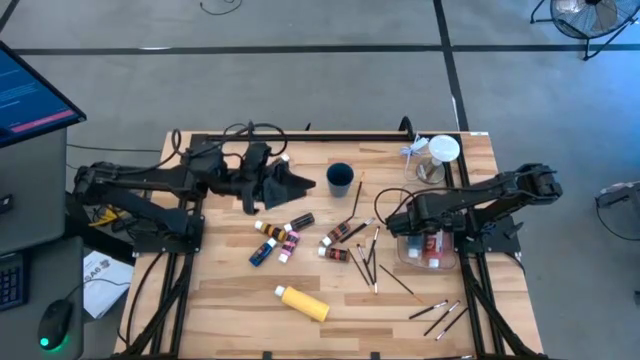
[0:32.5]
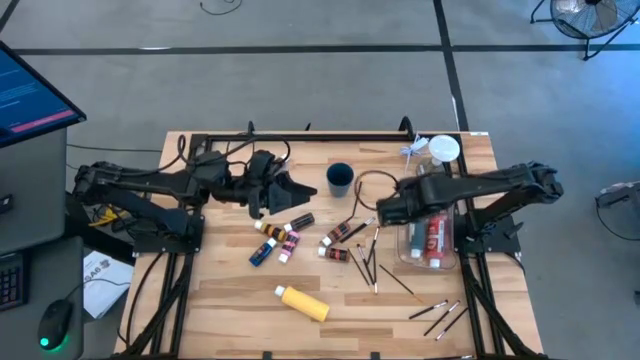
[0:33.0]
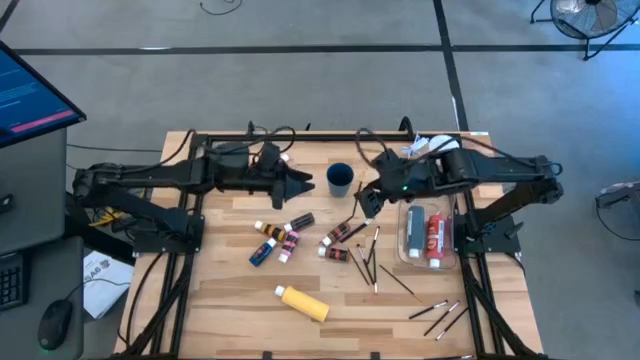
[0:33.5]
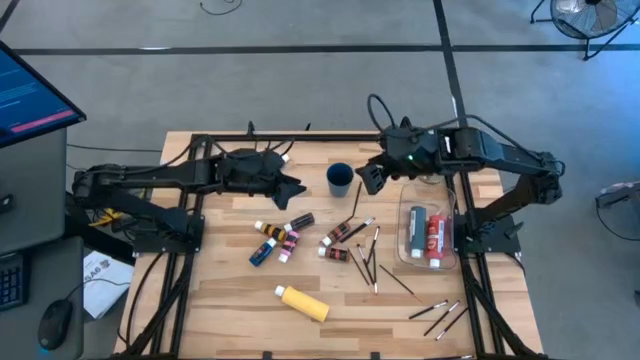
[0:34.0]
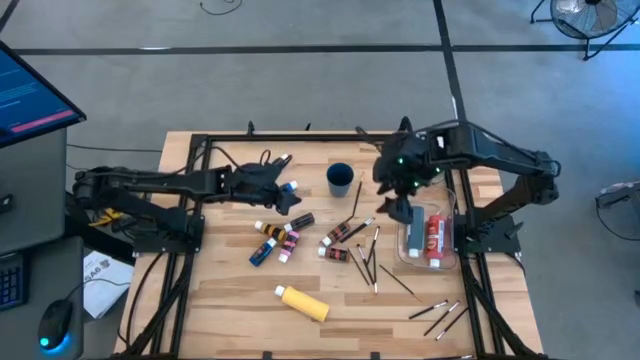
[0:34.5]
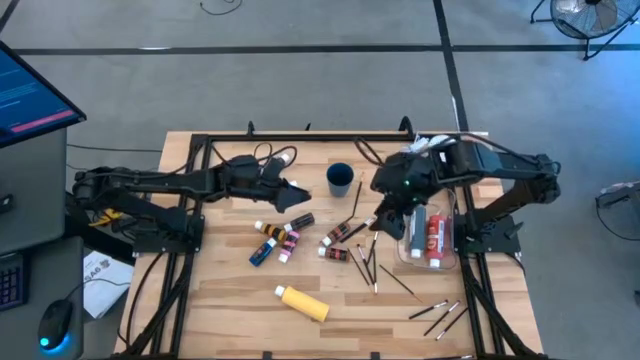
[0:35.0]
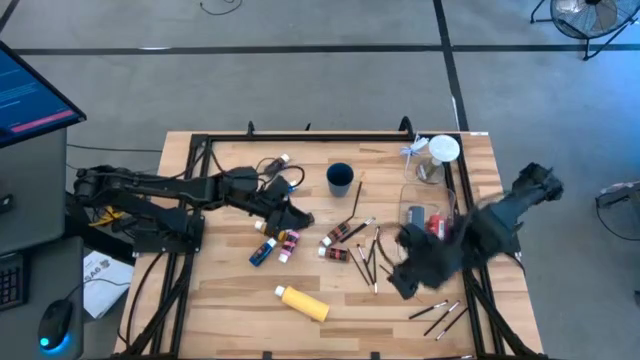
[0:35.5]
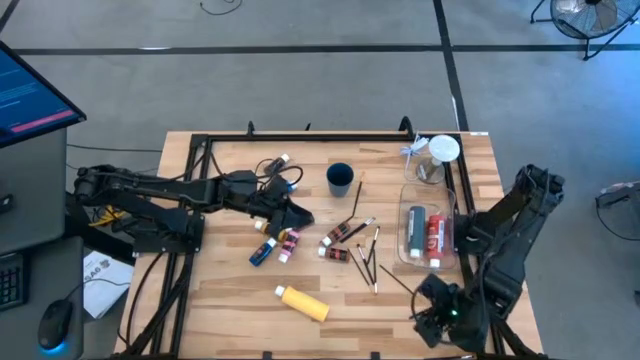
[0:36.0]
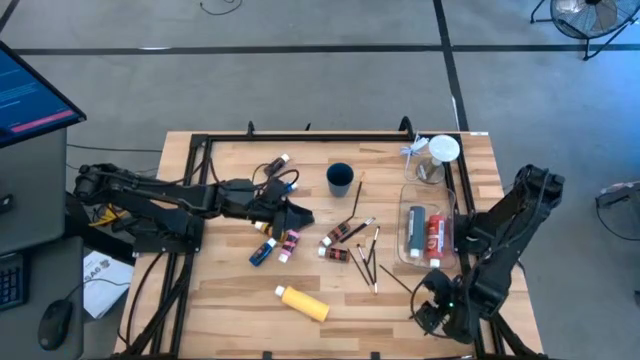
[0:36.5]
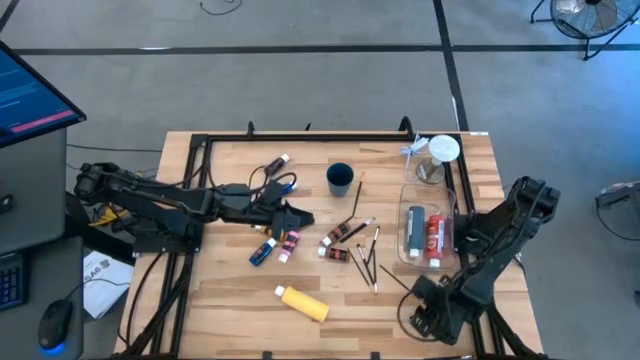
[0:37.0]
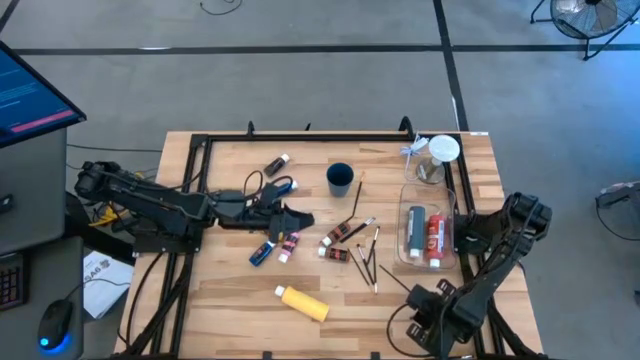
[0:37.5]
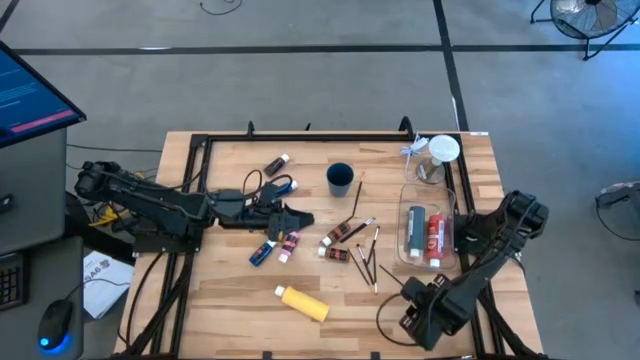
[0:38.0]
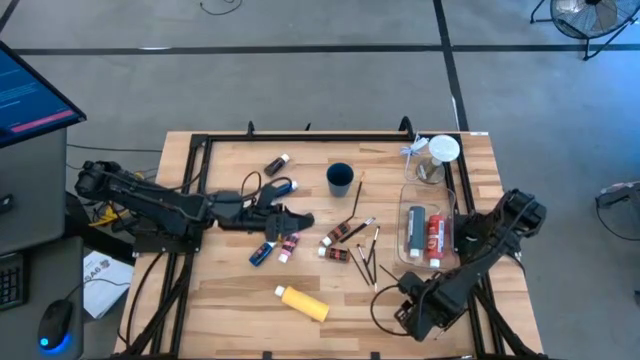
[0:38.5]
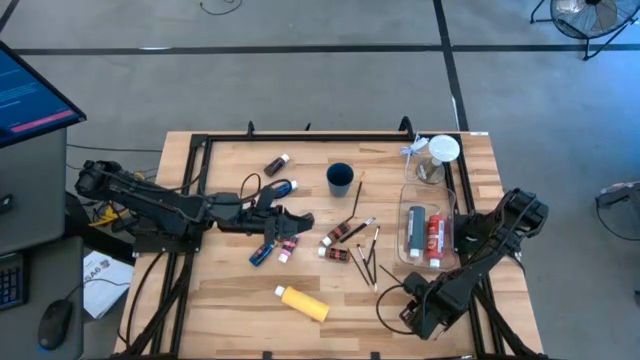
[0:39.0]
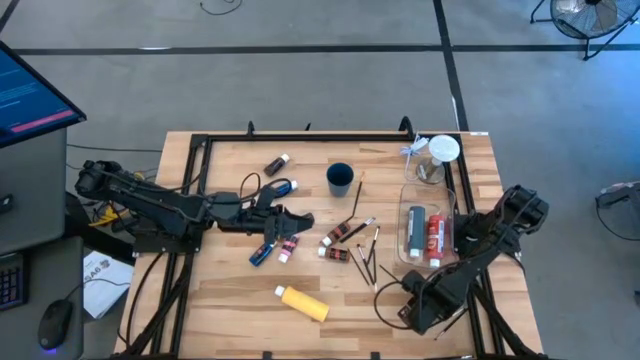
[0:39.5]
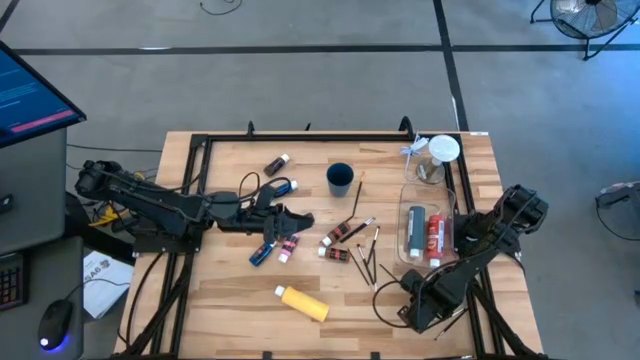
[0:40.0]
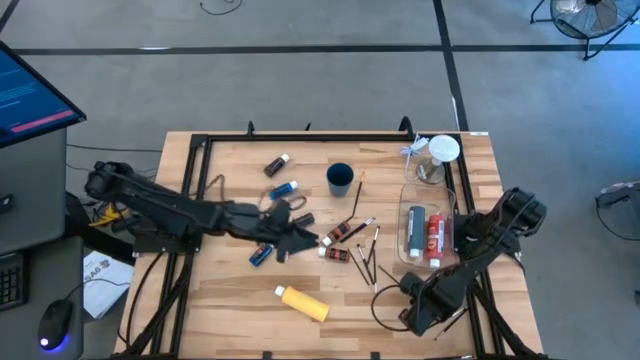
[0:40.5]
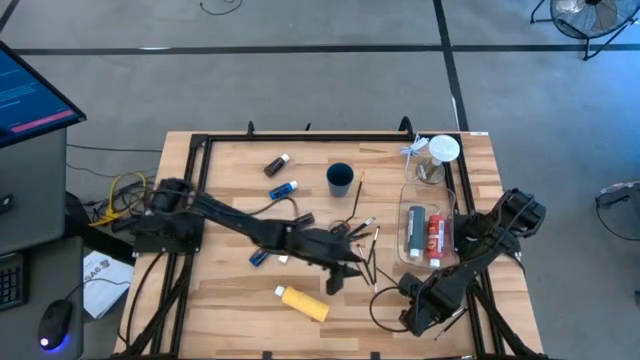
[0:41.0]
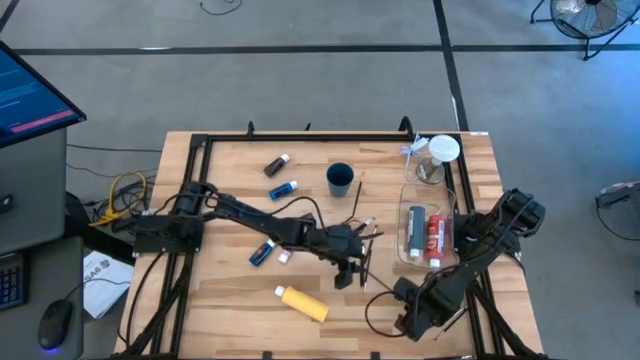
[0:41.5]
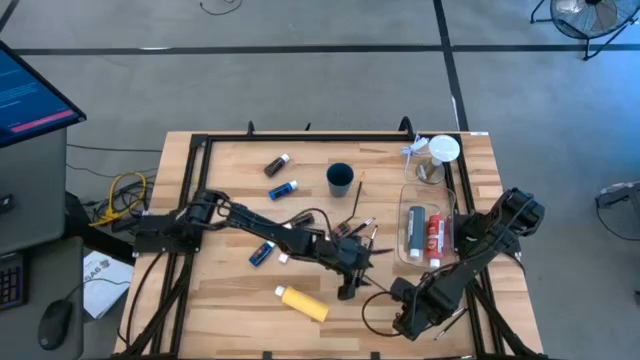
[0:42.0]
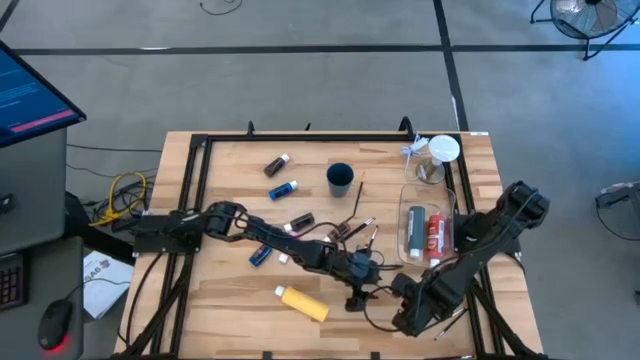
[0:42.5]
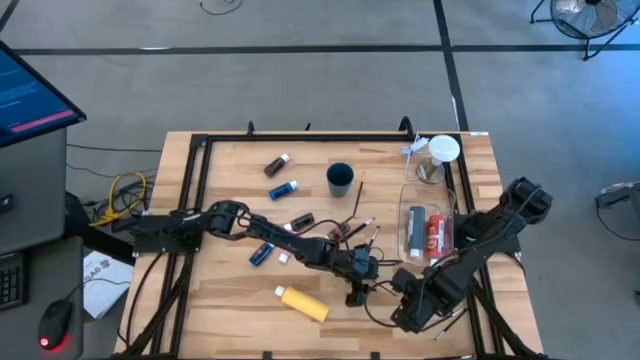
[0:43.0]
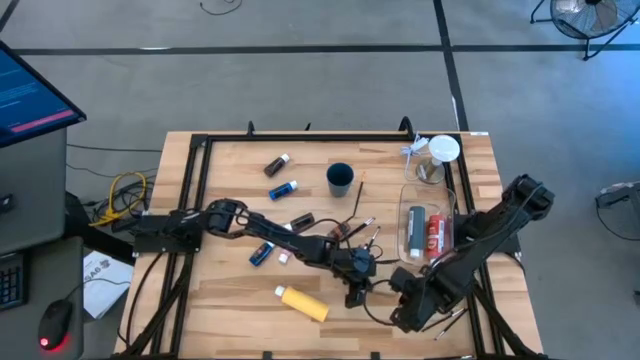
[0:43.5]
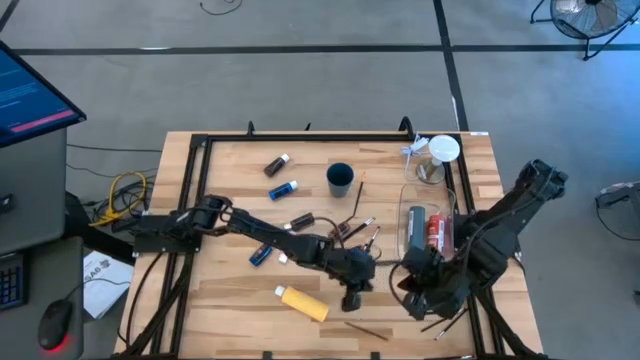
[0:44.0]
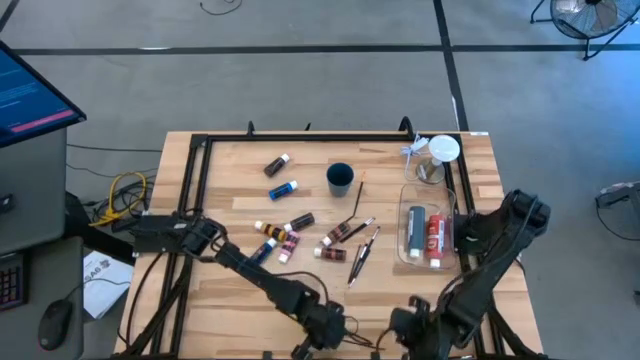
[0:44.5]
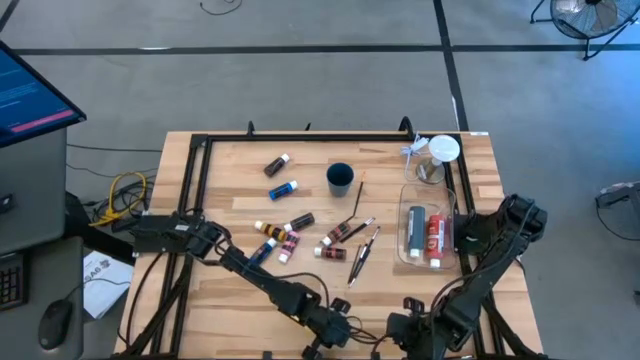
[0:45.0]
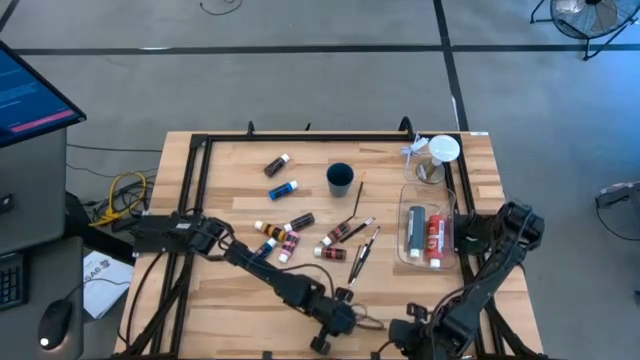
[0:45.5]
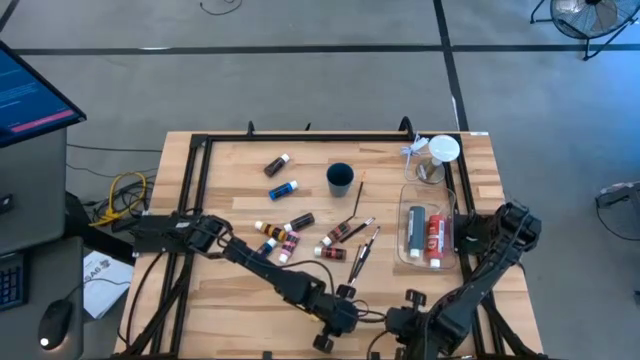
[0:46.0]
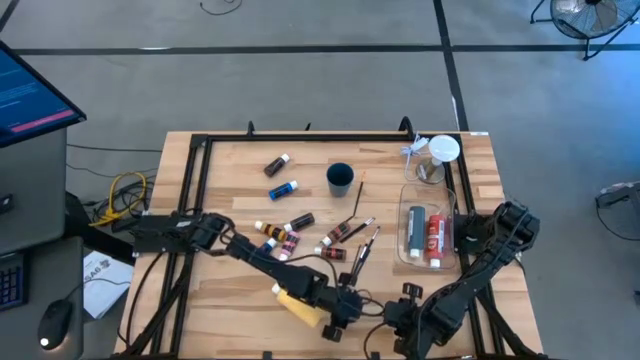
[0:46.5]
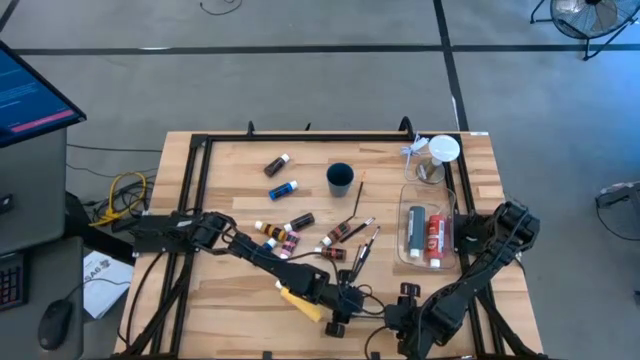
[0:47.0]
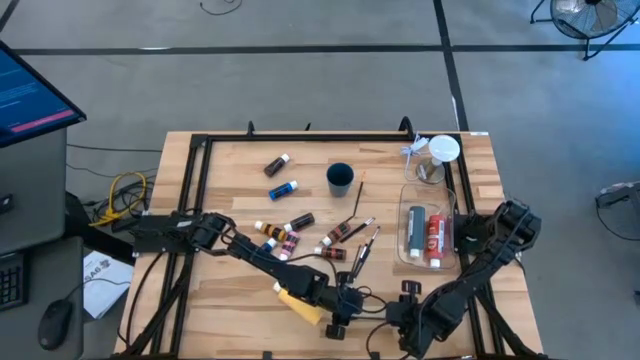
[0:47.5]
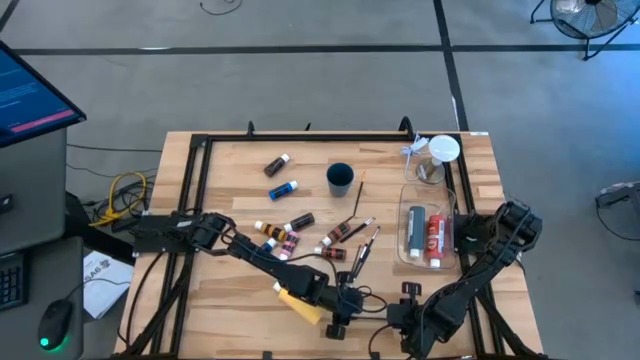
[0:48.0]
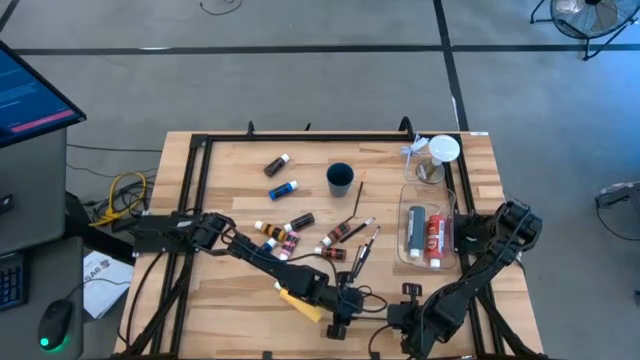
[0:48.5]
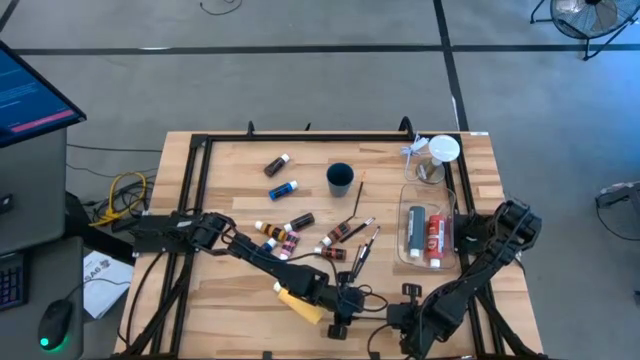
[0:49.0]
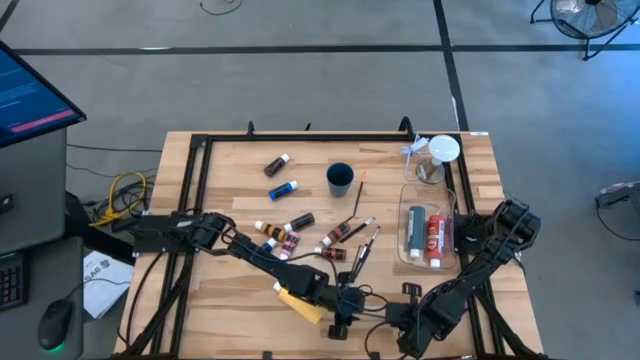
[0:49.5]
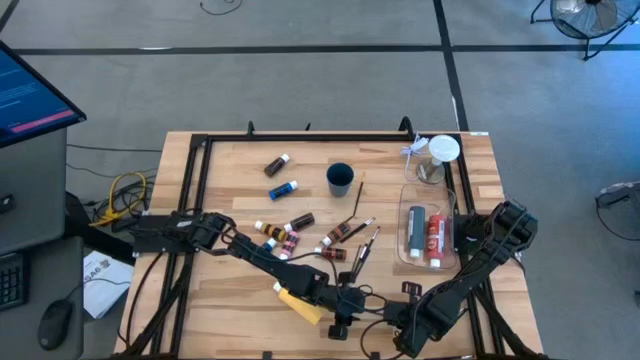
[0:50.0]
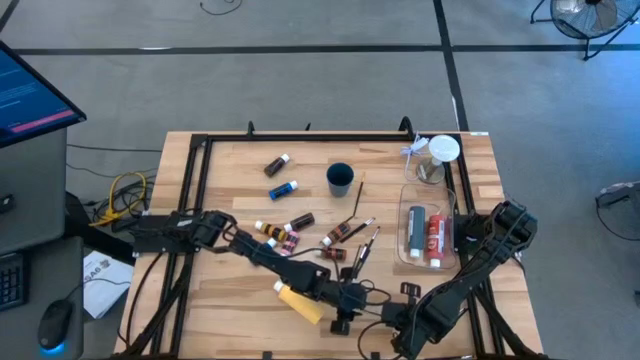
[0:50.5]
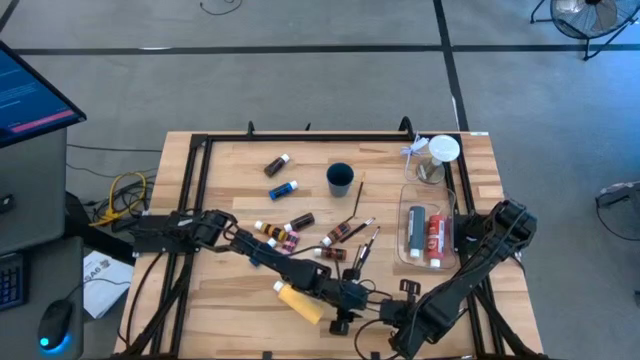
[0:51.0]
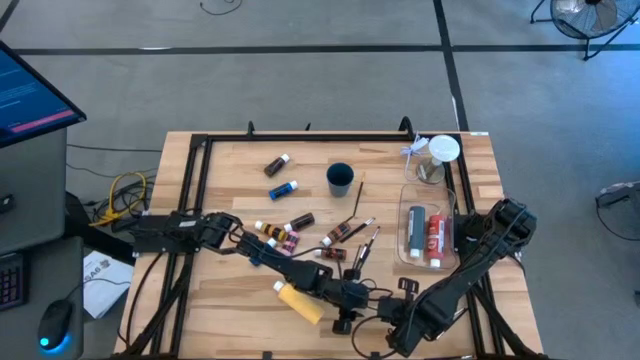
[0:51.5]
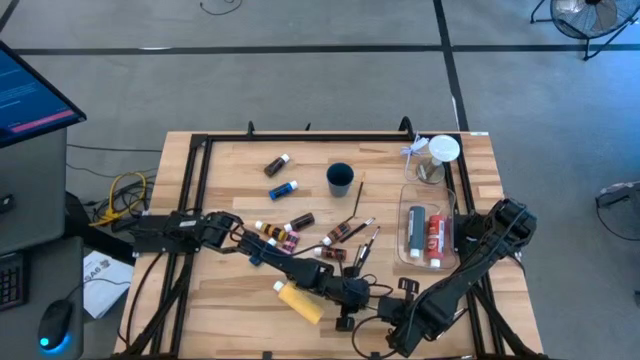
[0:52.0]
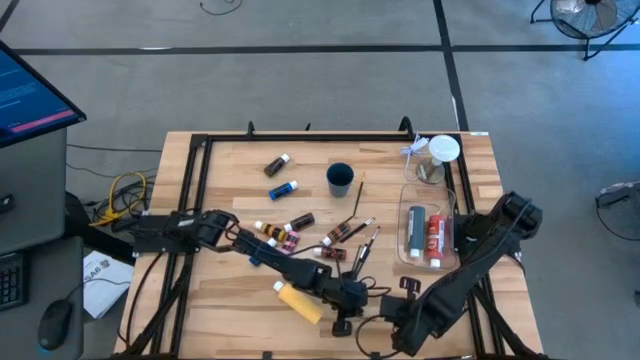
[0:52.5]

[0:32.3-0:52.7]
Task: Pick & Place Paint Supplies
Put the paint brush into the blue cup

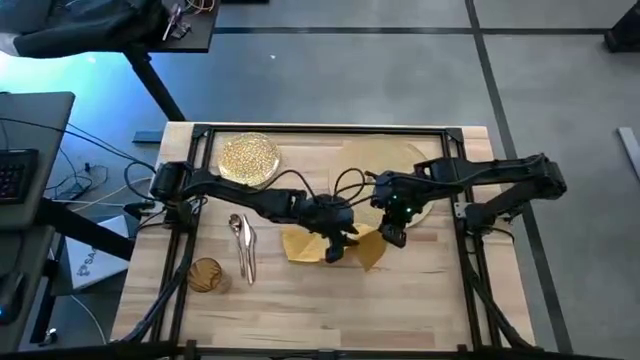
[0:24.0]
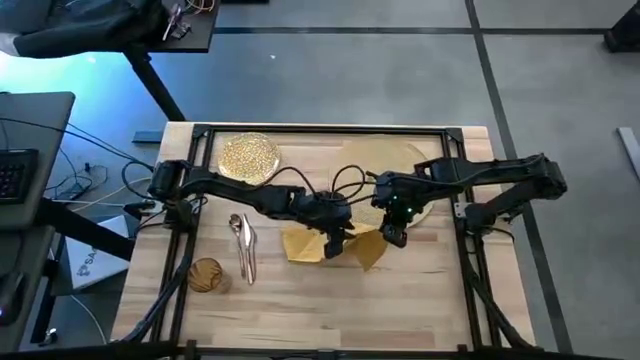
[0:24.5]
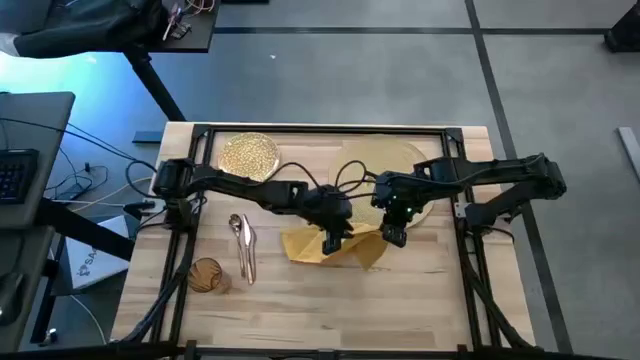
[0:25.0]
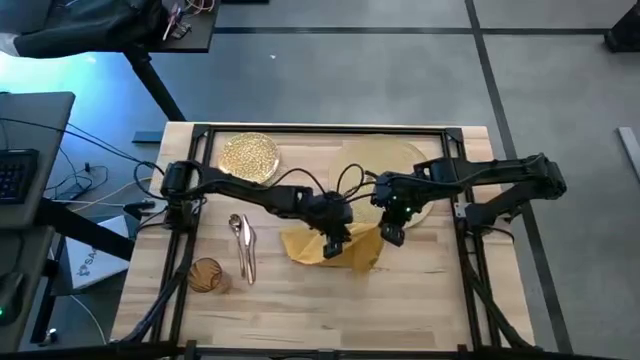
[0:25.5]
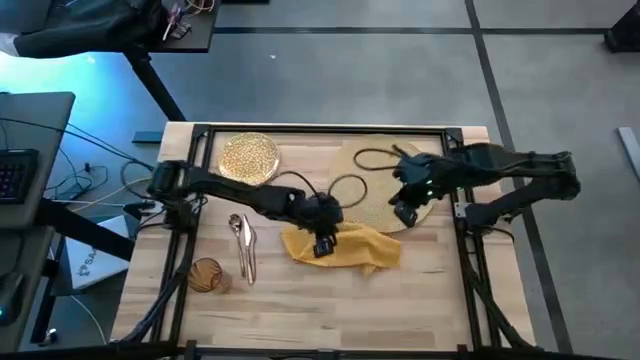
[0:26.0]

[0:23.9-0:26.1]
Task: Set table place
Fold the yellow table napkin on the table
